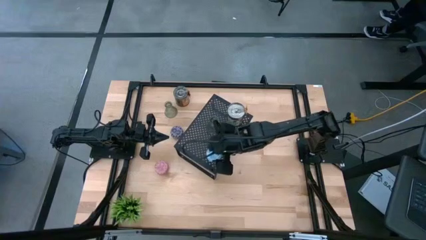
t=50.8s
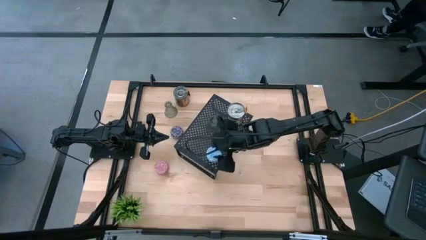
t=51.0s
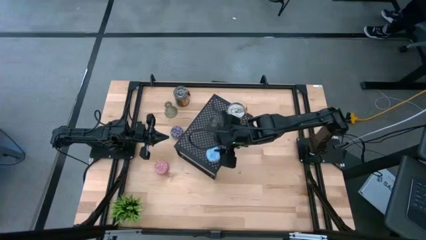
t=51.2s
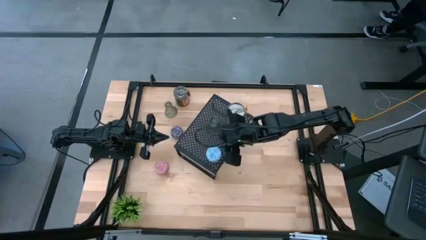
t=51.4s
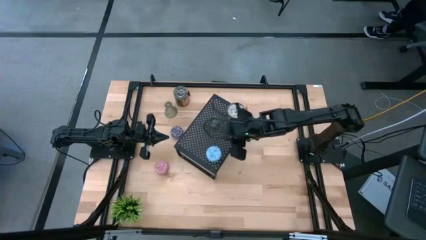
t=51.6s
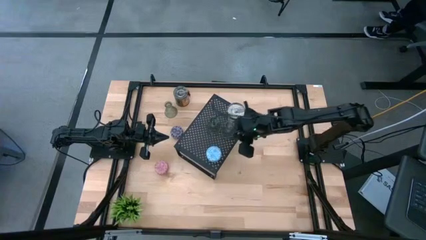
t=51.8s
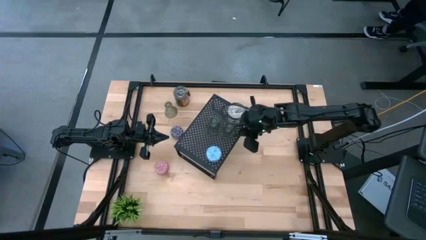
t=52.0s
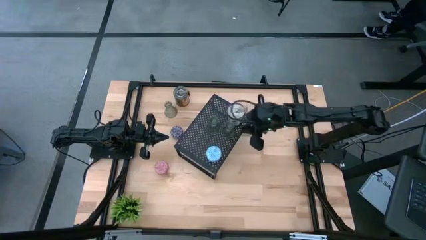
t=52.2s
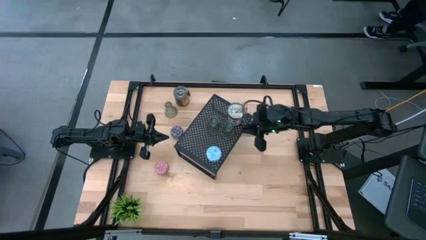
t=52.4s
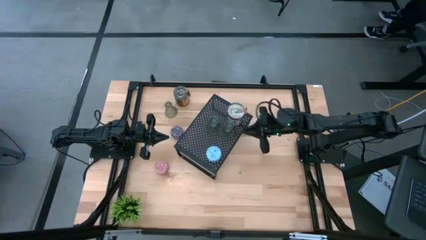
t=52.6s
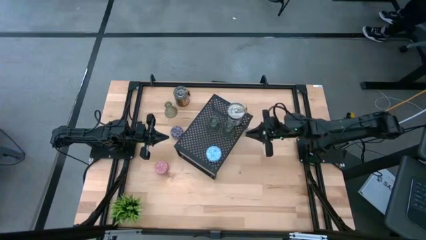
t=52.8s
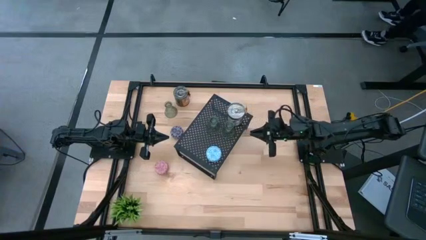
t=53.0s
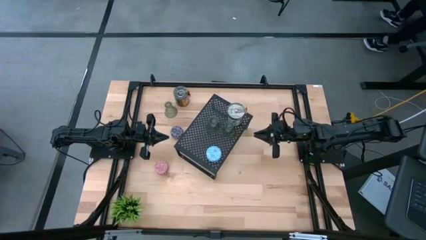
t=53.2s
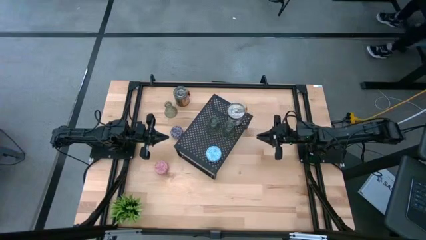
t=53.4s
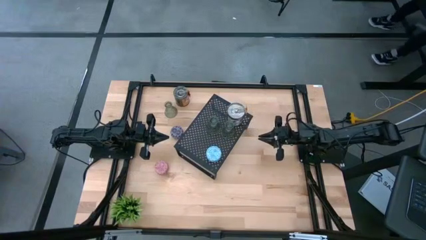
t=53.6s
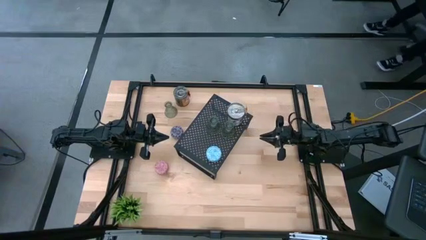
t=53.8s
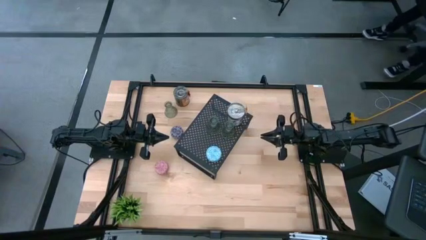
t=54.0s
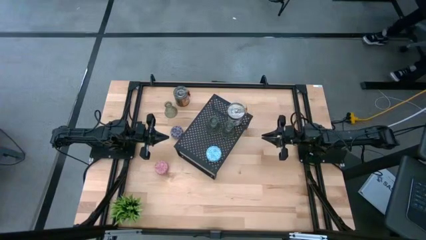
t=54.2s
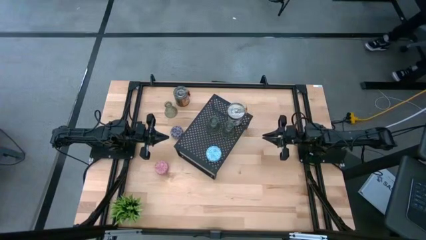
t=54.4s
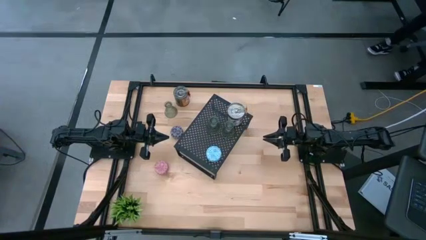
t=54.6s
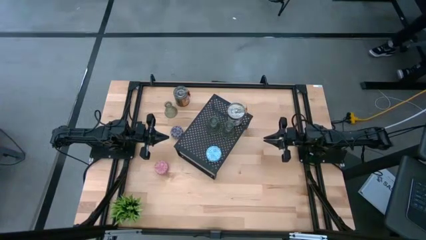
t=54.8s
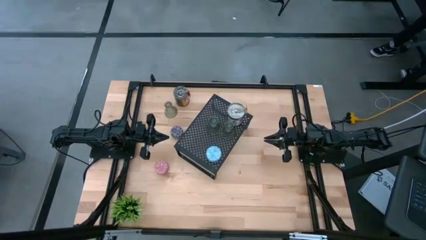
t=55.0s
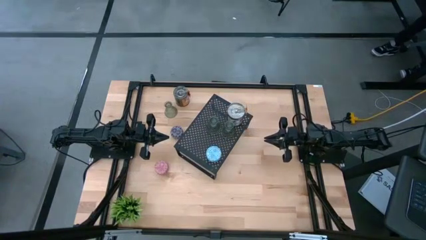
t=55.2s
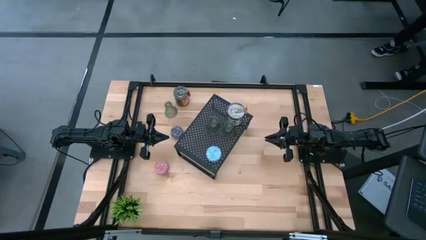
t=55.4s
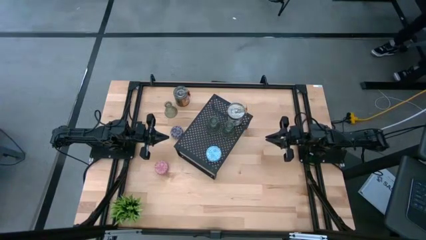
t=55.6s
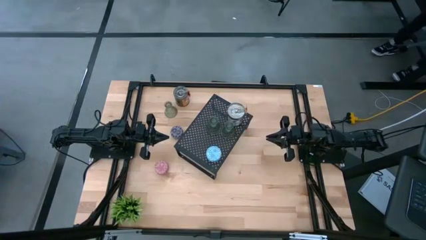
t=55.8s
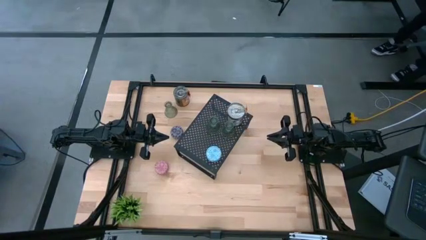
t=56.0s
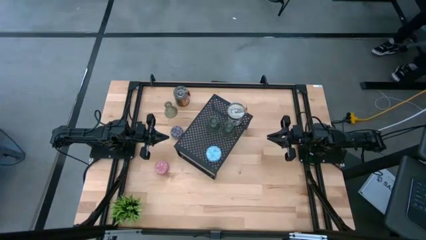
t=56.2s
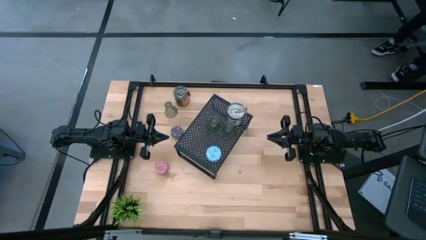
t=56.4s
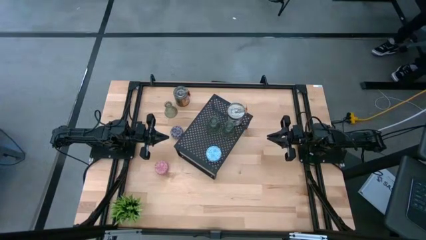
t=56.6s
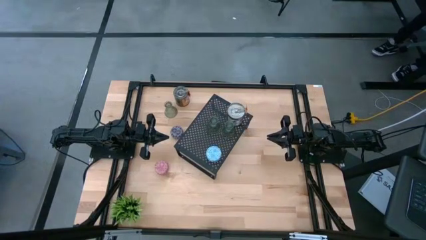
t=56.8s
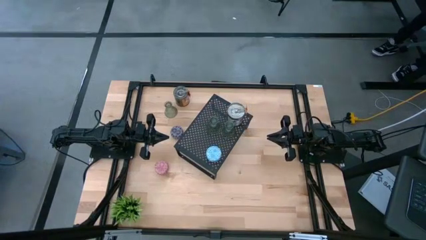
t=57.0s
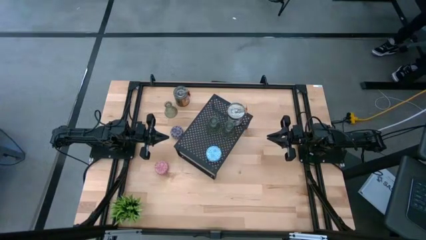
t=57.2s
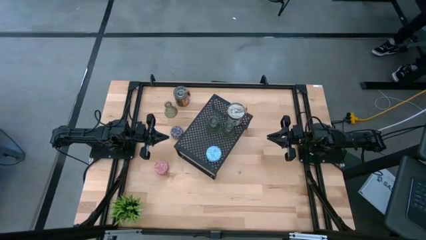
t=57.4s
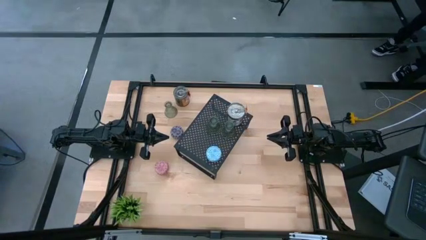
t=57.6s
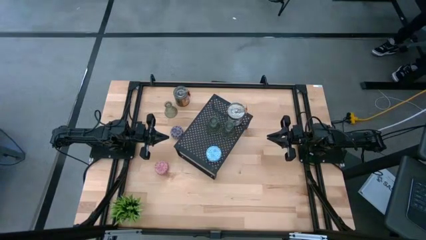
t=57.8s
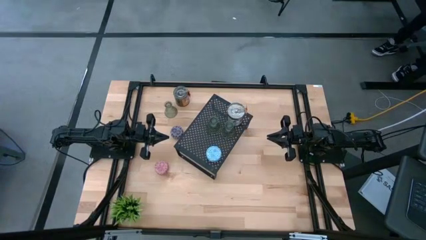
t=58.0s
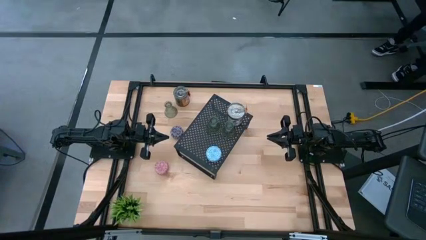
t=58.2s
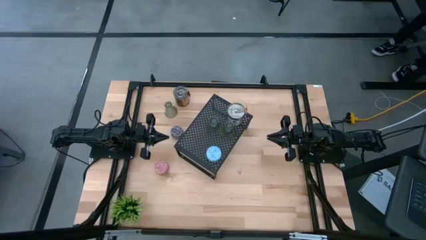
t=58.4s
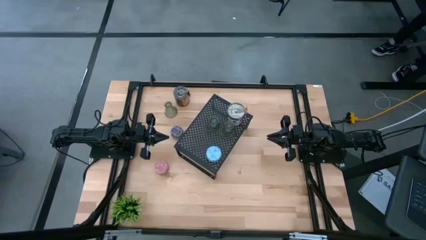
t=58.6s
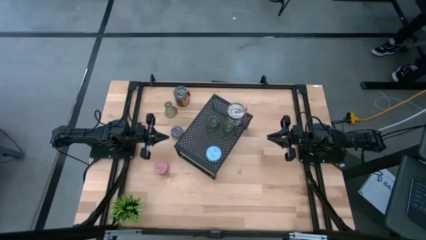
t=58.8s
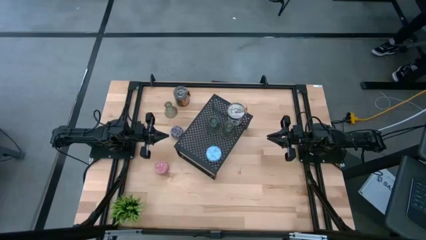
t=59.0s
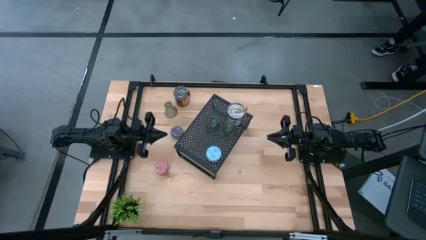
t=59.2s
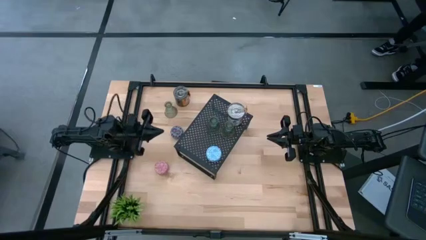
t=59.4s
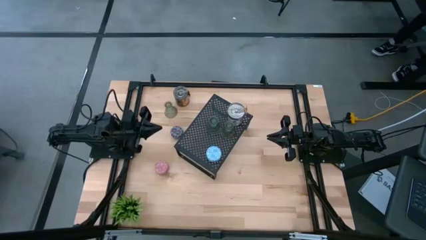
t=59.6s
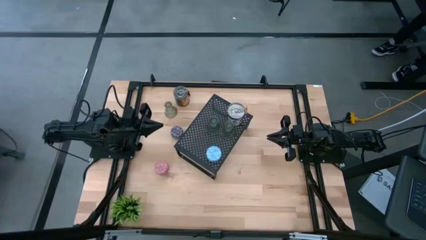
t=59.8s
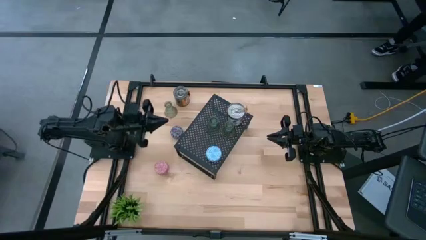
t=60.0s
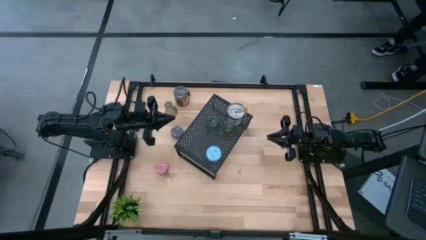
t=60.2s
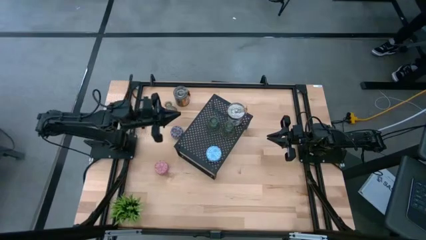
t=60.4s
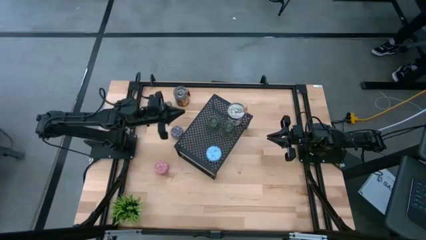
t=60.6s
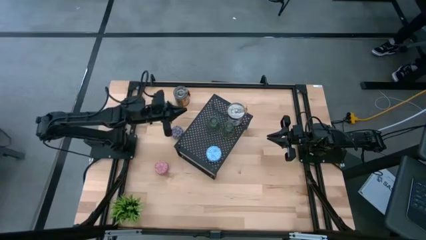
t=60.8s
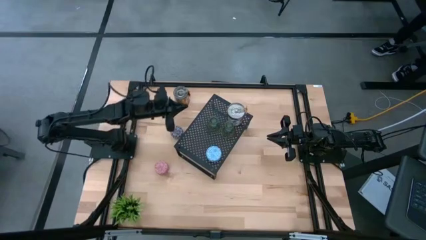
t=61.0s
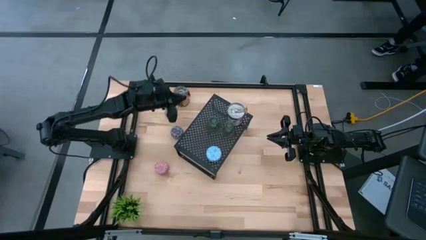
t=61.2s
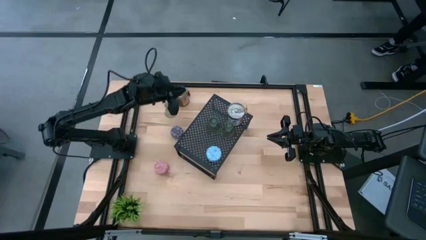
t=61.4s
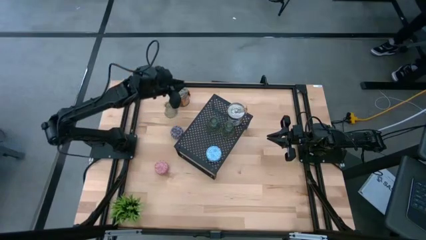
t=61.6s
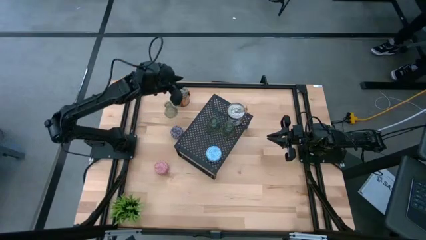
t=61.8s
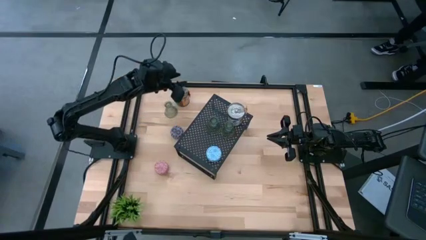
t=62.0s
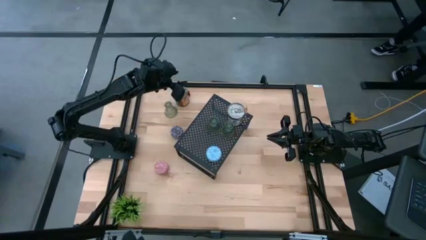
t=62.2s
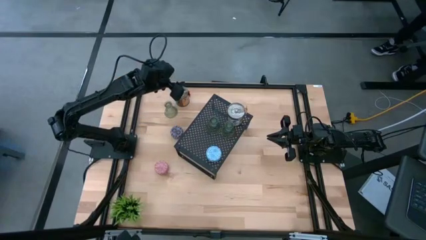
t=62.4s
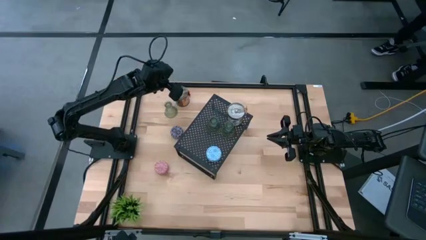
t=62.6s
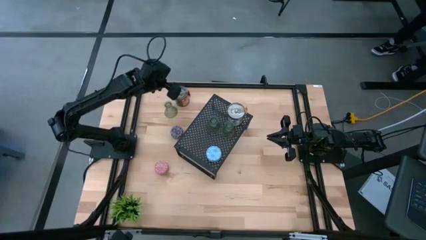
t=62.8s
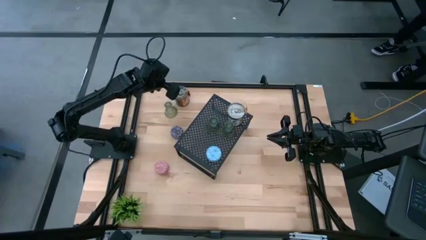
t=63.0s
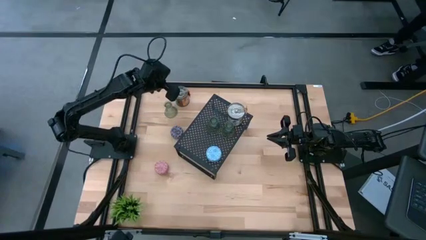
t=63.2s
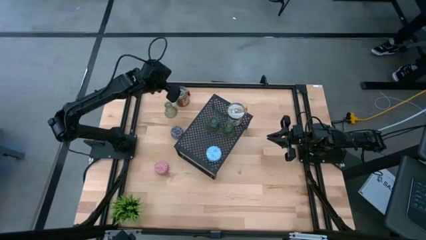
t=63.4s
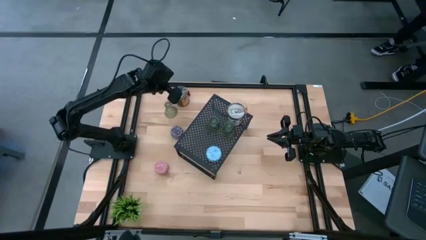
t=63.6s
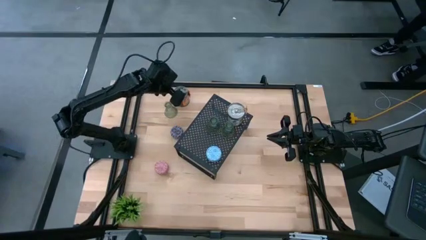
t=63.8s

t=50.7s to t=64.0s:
Task: Pick & Place candle stick holders
Put the scented candle on the shelf

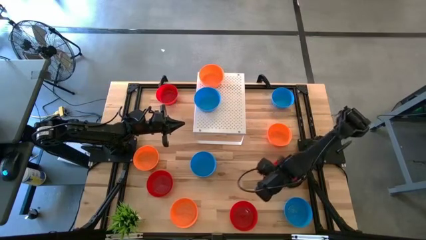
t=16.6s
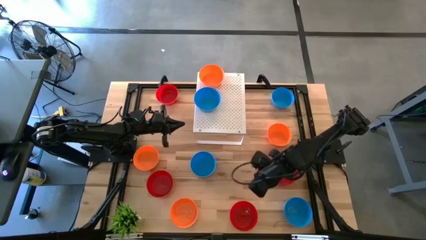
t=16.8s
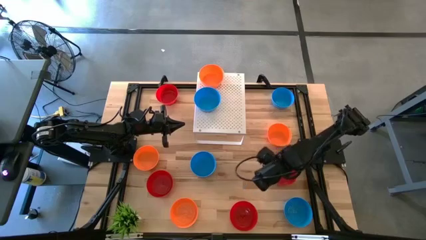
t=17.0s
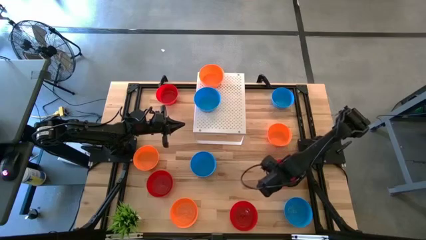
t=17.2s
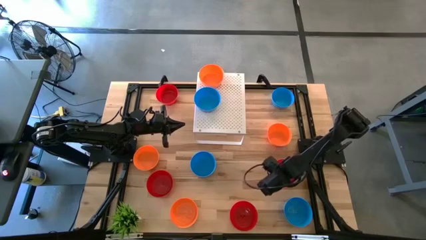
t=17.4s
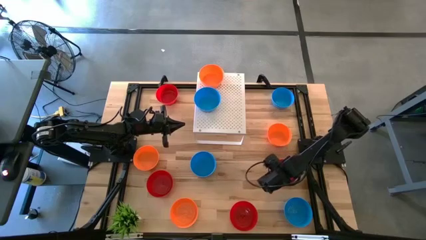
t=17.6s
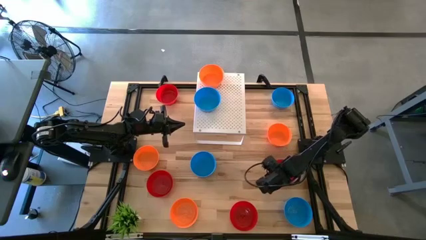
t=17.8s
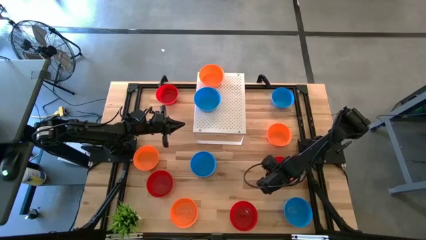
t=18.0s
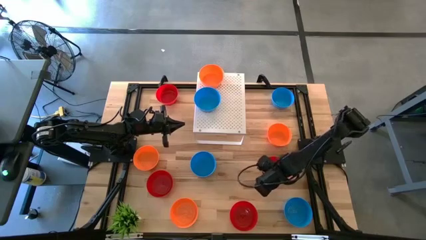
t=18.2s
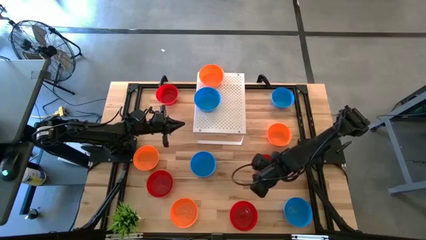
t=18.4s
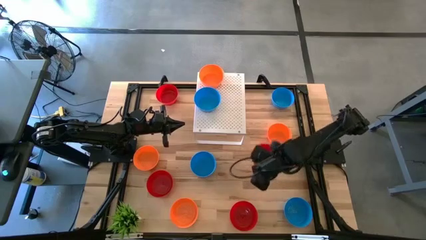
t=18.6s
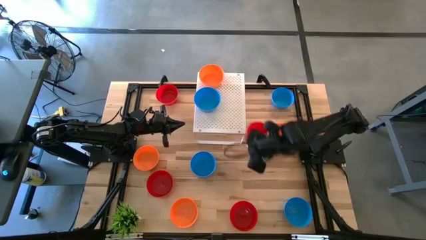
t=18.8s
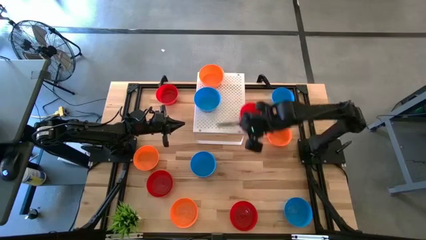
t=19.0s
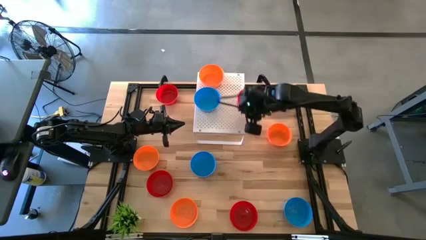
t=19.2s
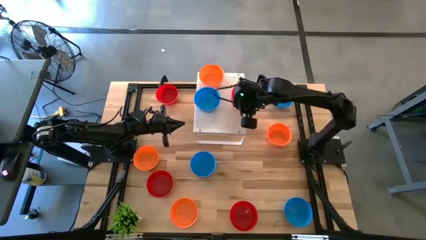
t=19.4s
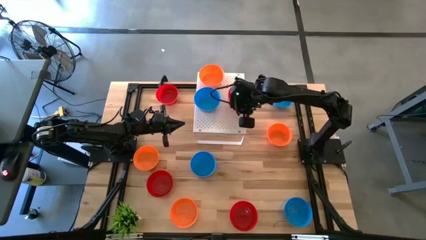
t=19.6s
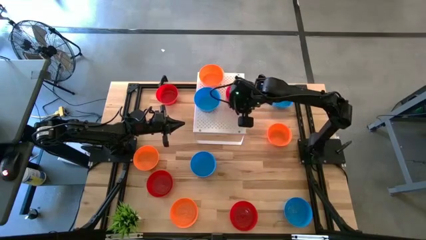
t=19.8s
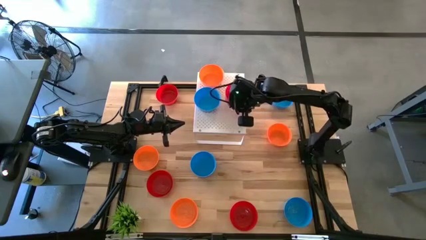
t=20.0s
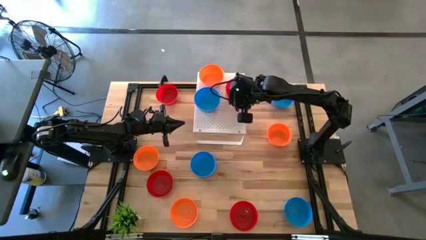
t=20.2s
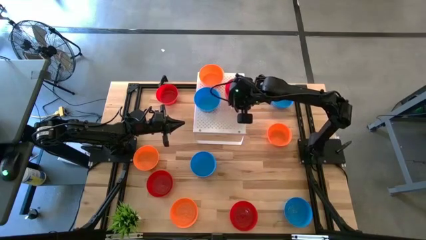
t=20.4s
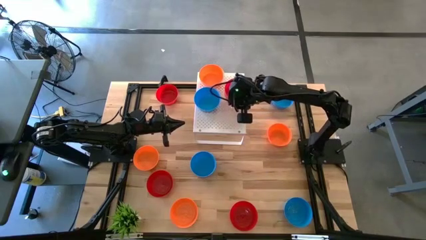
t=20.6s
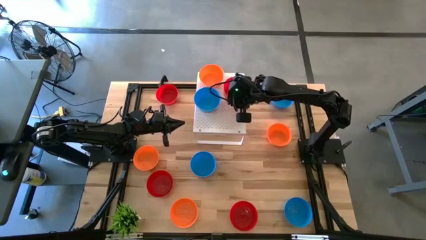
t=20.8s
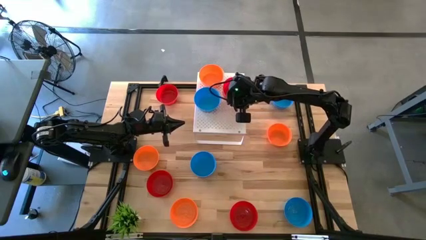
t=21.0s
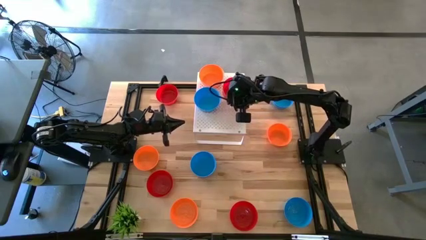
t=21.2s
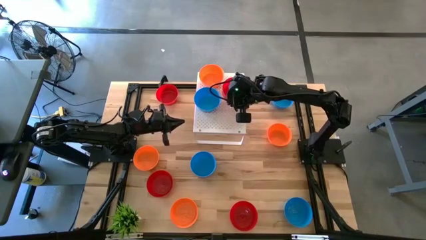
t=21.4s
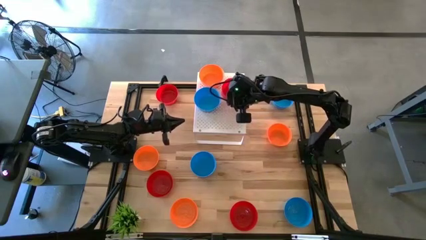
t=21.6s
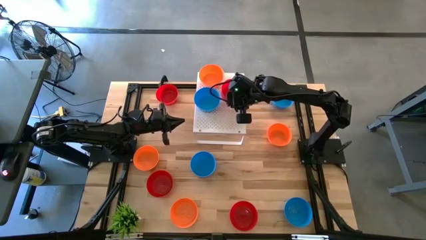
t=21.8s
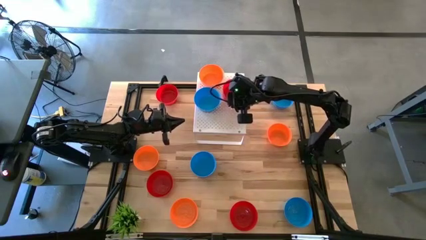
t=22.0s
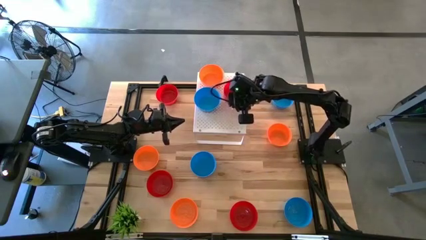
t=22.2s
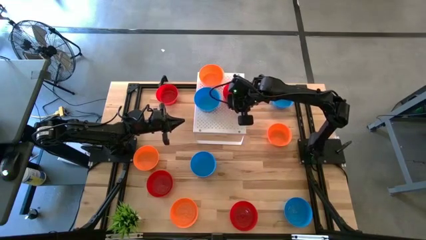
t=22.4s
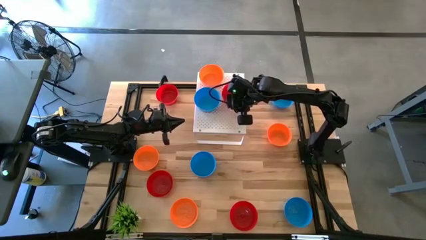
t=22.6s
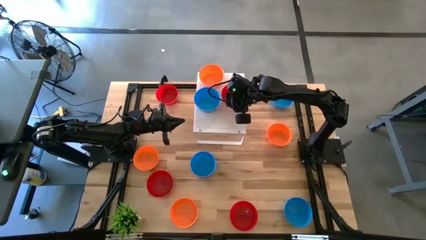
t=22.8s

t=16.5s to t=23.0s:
Task: Pick & Place Mini bowls
Put the red bowl on the shelf
